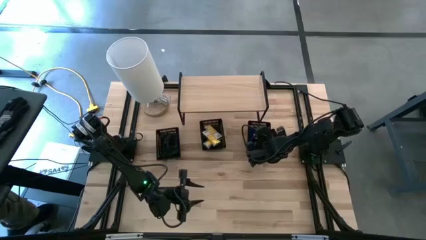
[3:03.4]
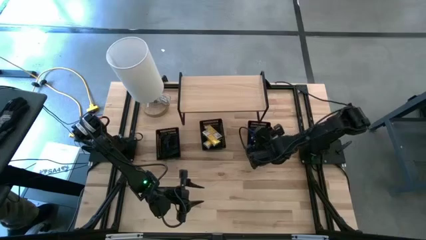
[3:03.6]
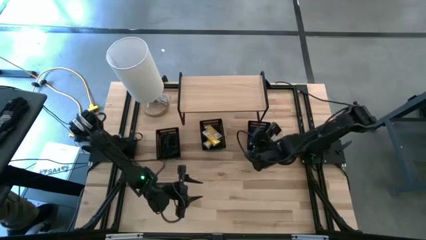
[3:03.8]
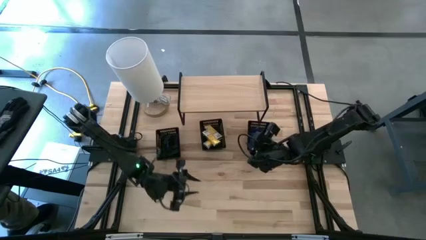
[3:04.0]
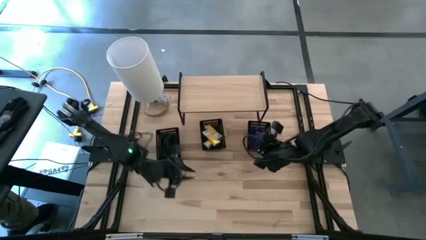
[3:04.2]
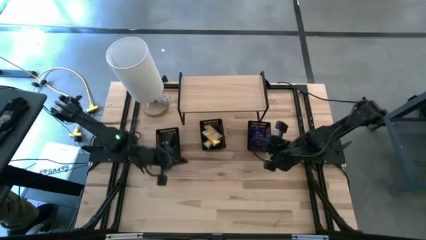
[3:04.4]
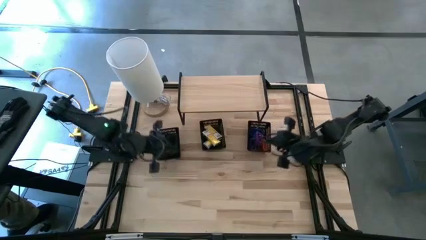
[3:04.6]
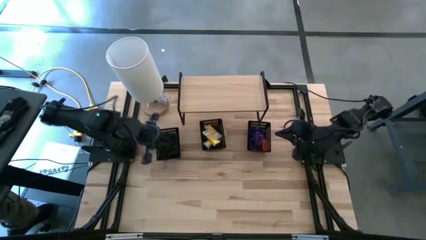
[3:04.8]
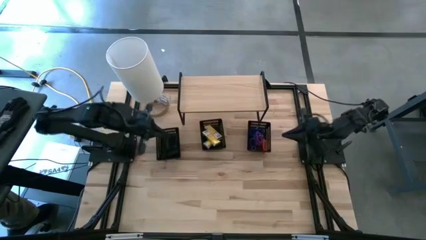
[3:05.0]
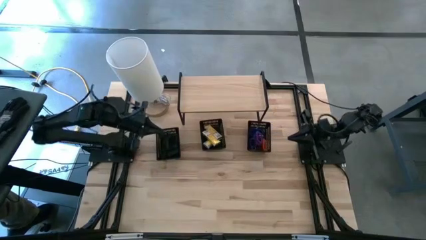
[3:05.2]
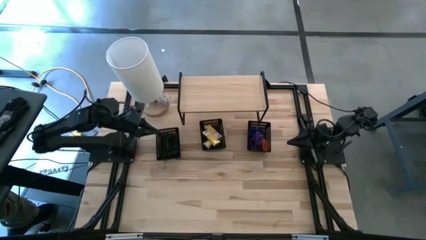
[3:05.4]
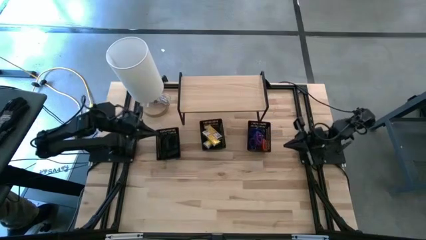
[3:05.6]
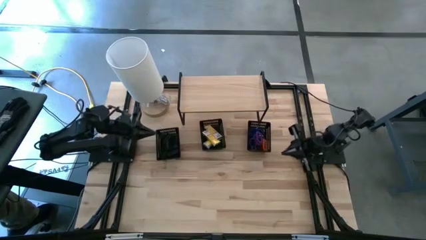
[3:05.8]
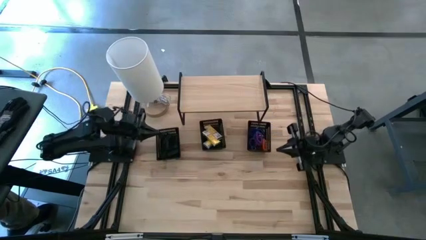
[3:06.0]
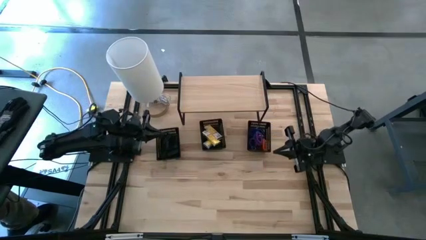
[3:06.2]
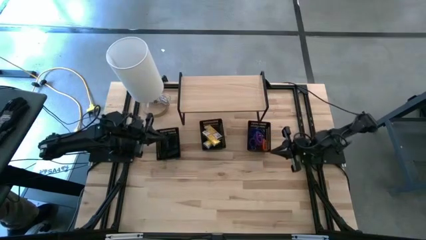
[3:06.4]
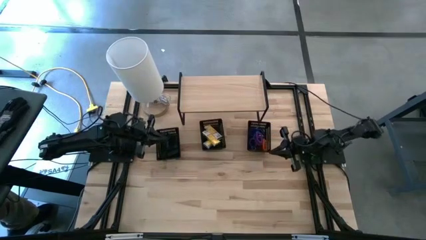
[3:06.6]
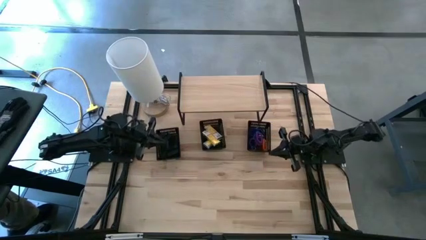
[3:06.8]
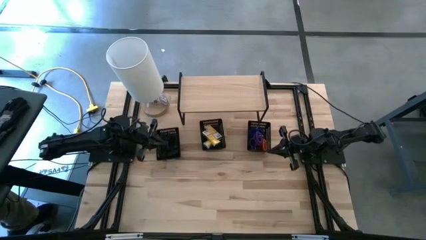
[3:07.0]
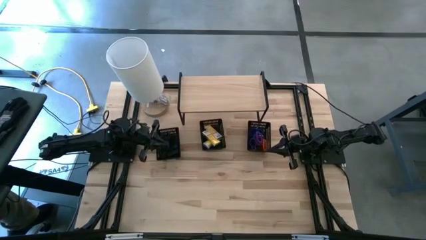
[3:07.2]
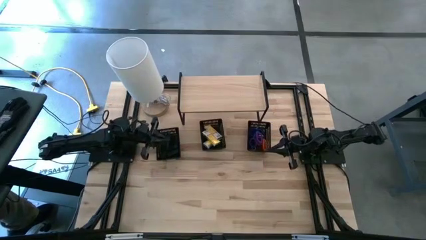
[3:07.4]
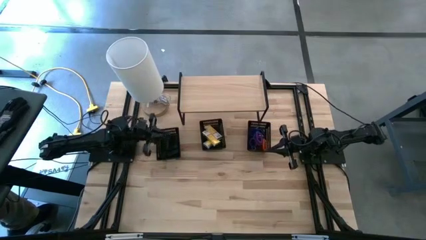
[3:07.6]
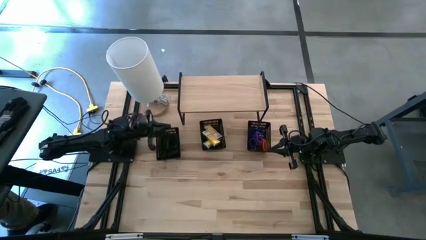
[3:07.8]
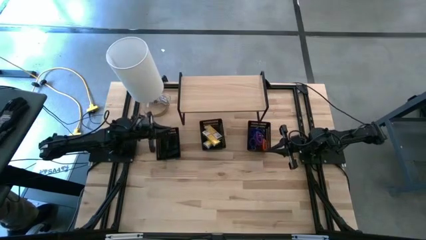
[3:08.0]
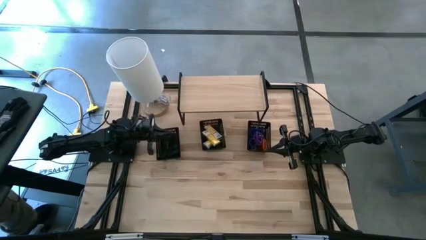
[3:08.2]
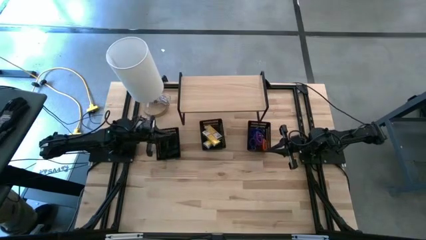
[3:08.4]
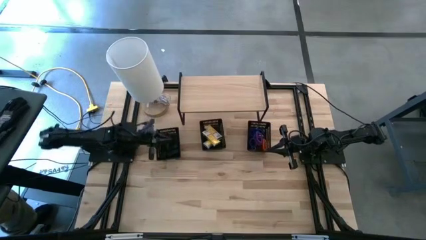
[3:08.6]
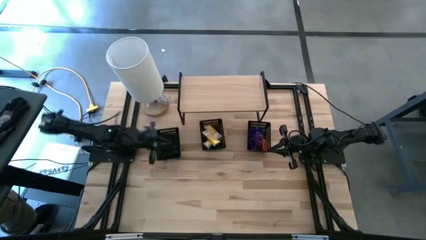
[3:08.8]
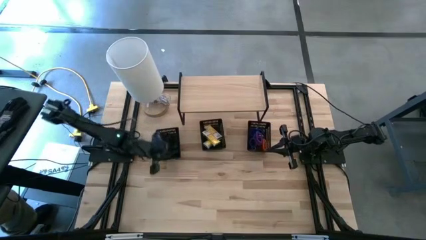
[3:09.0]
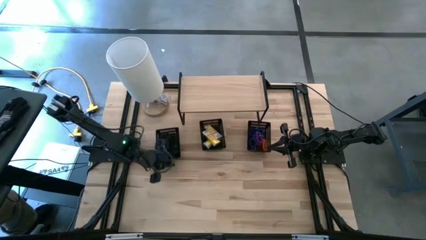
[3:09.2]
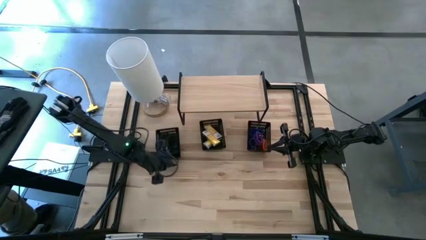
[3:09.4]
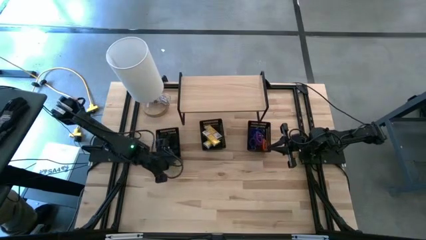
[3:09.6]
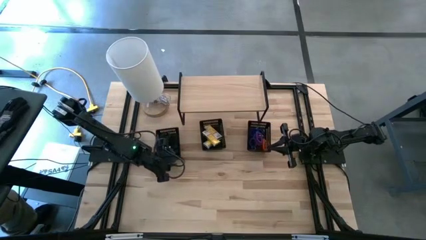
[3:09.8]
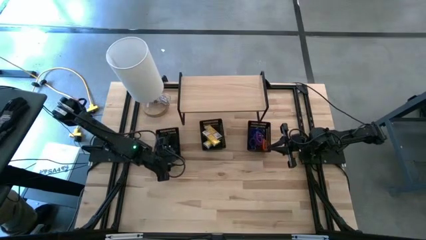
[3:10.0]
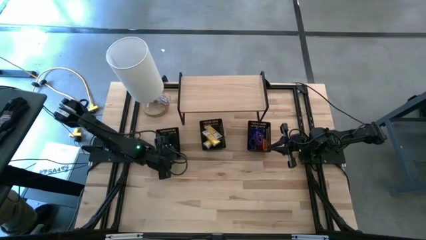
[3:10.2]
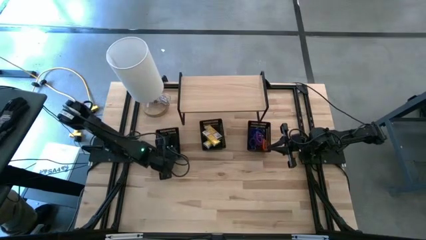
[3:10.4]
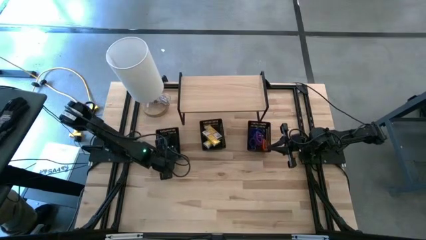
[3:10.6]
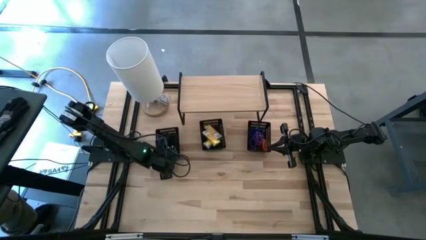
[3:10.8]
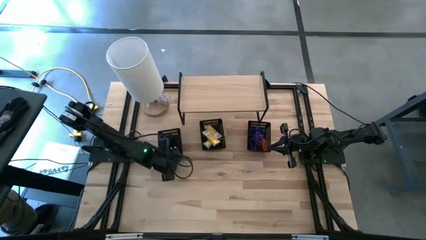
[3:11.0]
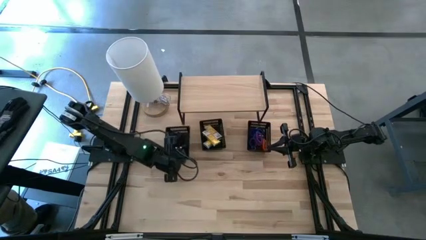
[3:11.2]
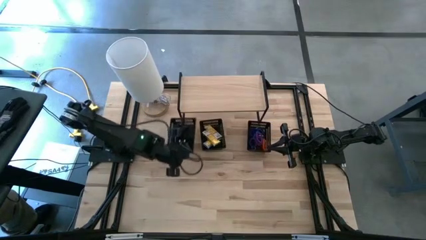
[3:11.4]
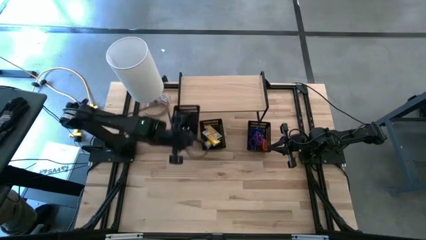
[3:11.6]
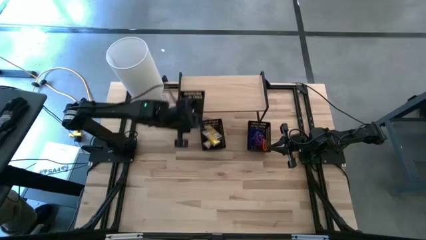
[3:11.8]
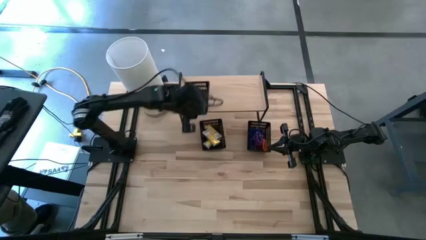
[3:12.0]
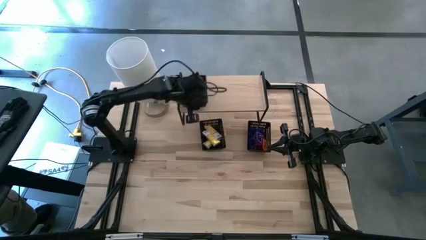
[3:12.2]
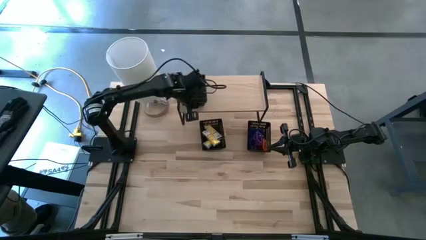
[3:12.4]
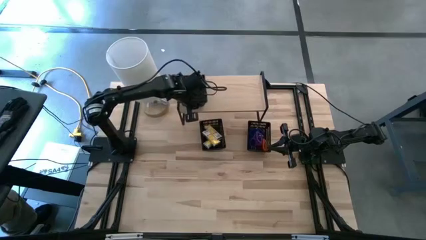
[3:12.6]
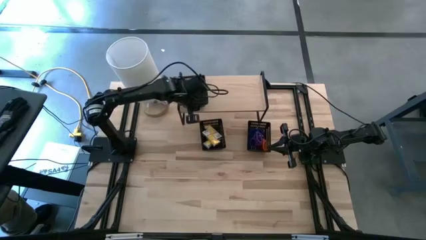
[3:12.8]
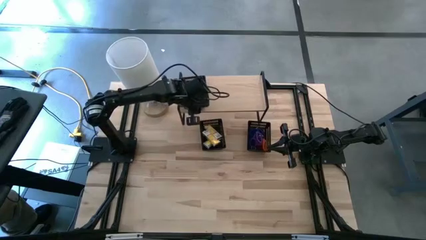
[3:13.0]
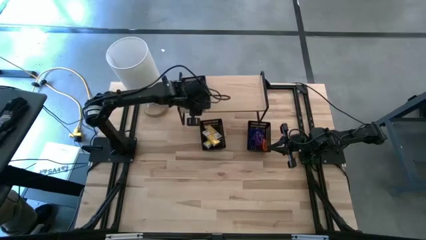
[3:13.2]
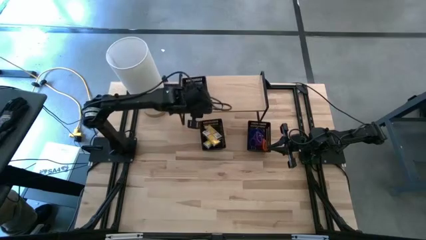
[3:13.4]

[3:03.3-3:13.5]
Task: Pick & Place Office Desk Supplies
Put the left black bin on the shelf

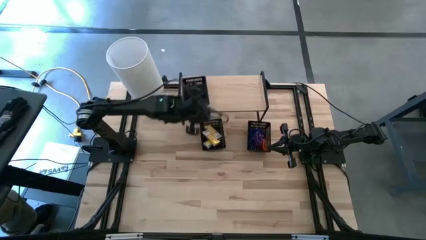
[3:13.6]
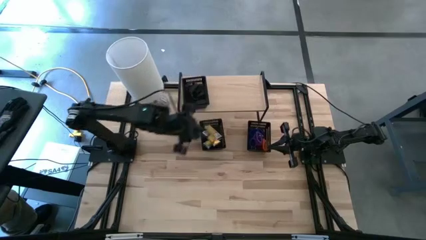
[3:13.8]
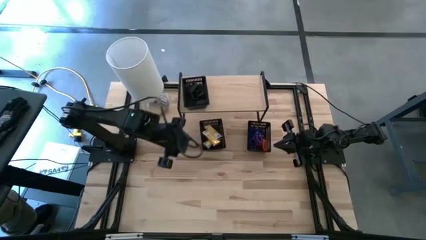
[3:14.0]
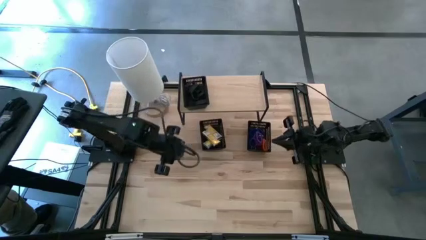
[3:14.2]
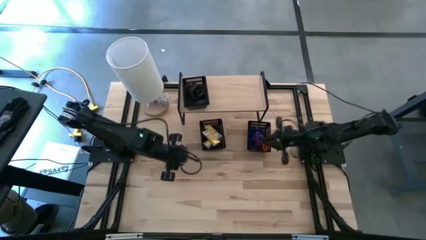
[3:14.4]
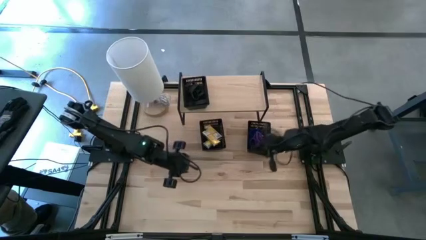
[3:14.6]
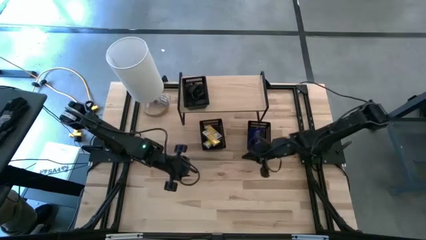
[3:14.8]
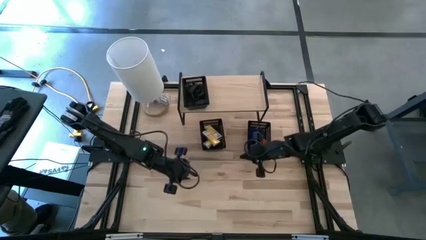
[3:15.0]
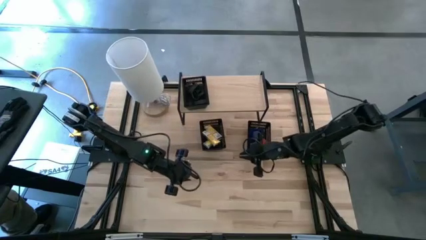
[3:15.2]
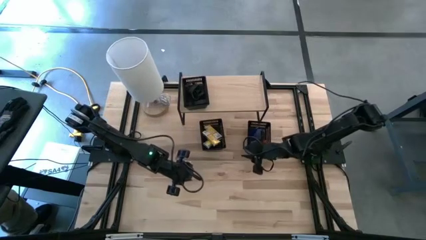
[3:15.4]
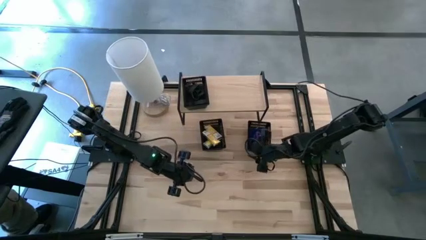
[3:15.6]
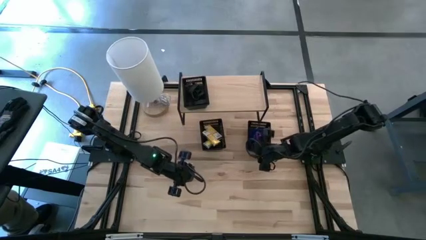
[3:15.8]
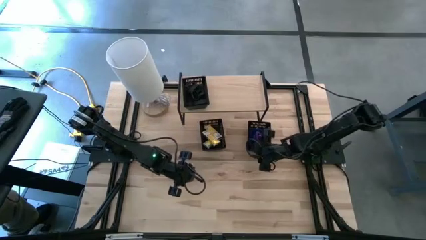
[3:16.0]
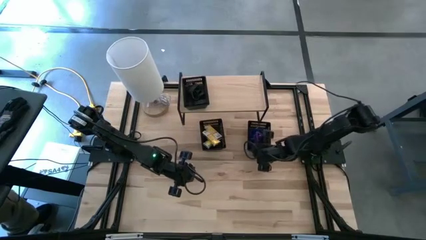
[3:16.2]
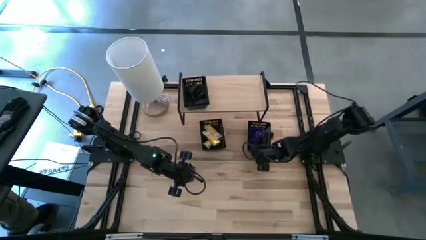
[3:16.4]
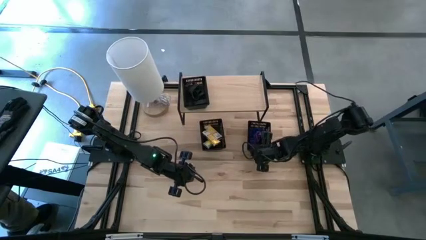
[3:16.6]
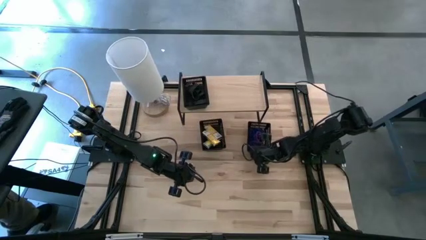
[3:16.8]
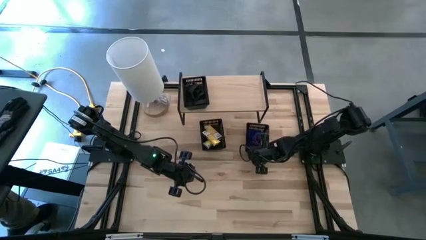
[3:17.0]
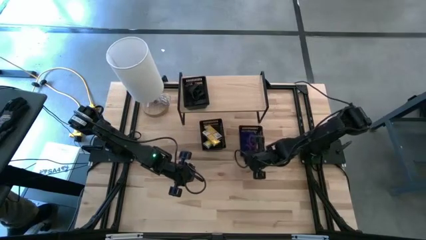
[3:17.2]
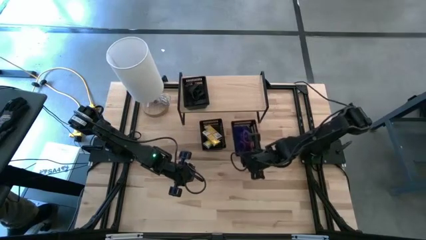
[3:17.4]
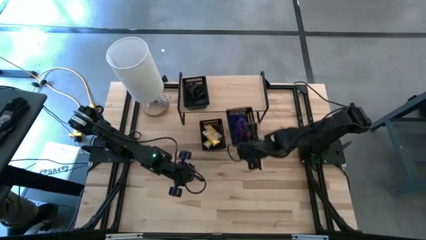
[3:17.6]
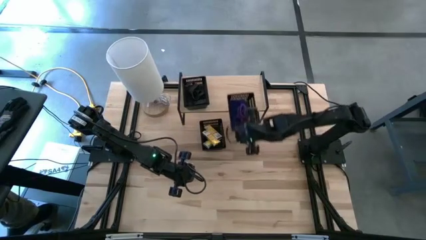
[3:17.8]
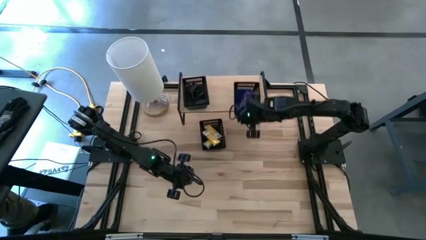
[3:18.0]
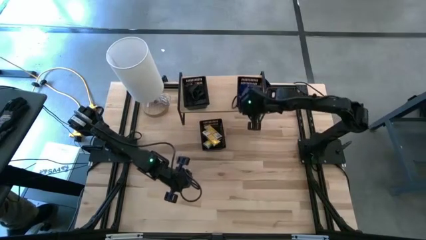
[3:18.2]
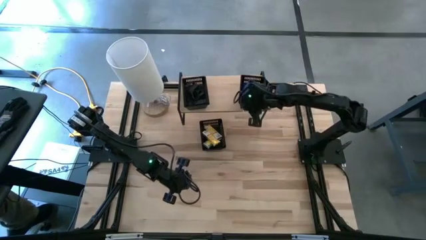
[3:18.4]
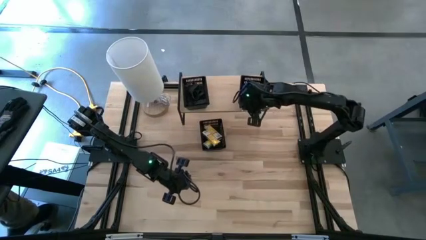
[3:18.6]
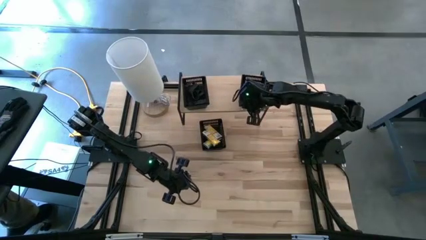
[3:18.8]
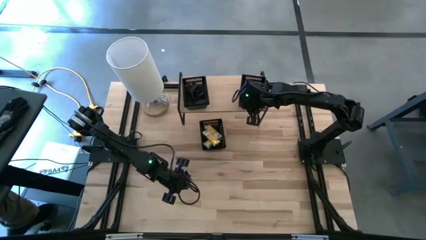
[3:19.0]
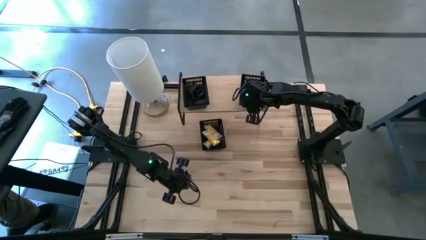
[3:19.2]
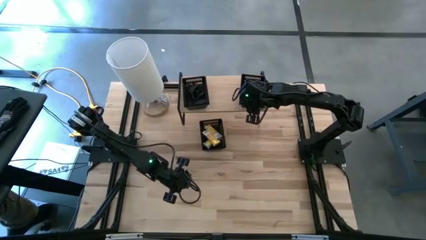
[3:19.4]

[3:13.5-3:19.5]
Put the right black bin on the shelf

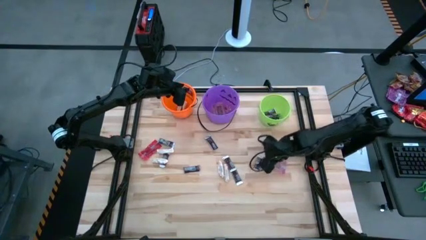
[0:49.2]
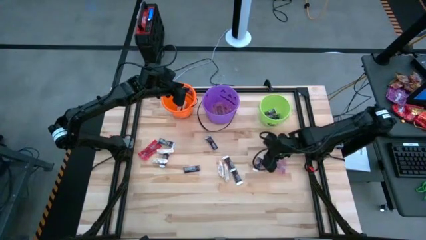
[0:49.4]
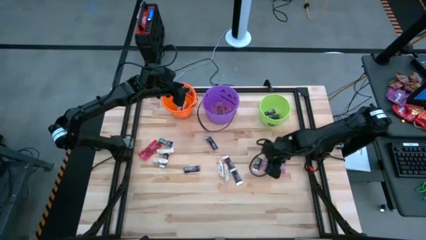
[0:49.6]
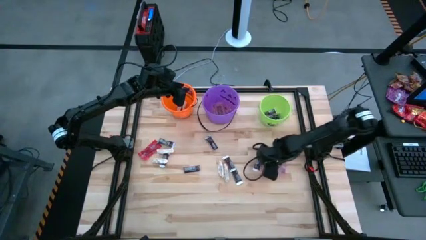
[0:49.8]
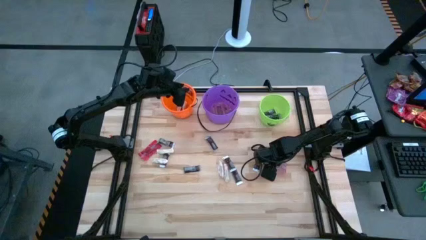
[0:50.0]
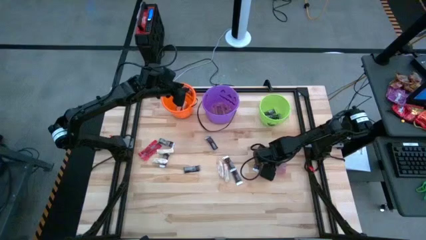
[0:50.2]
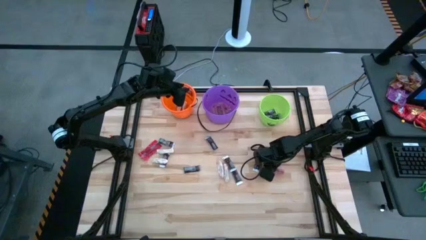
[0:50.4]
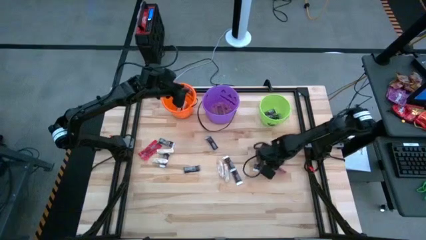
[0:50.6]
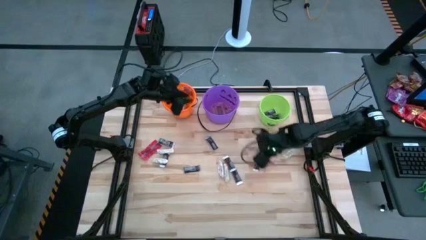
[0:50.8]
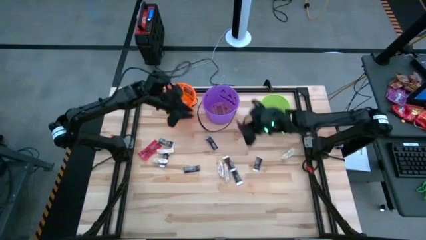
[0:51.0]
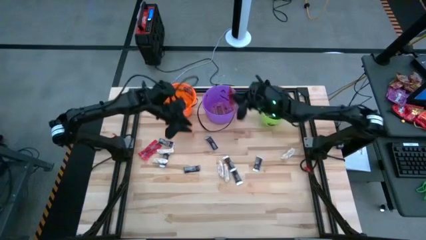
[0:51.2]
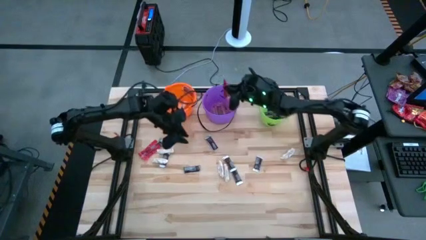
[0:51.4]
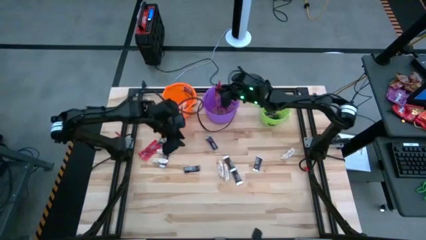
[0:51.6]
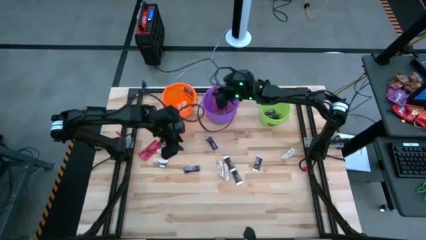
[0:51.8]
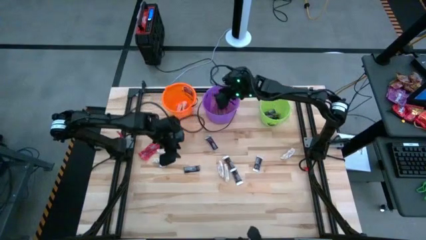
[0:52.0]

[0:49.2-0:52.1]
Task: Sort candy by brand, put in halloween buckets
Put the red candy pack into the purple bucket
